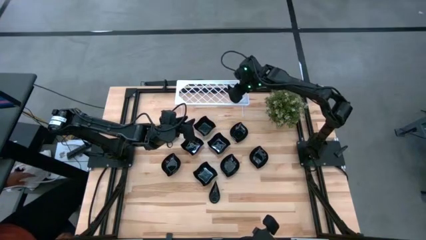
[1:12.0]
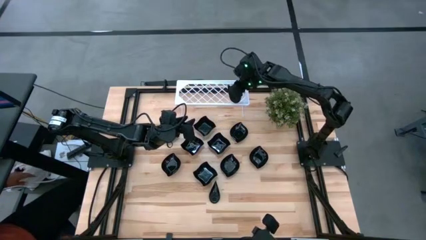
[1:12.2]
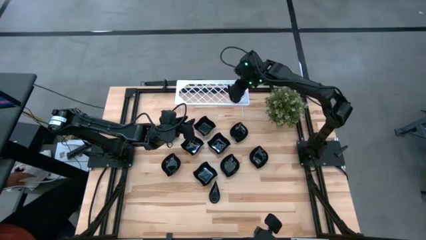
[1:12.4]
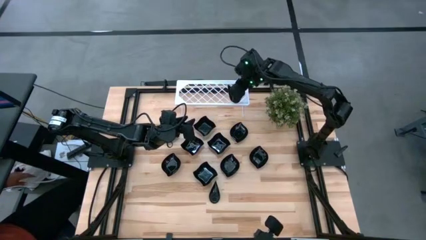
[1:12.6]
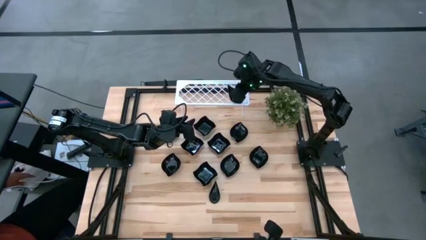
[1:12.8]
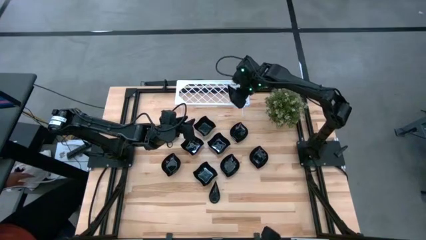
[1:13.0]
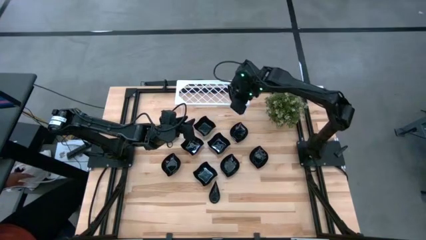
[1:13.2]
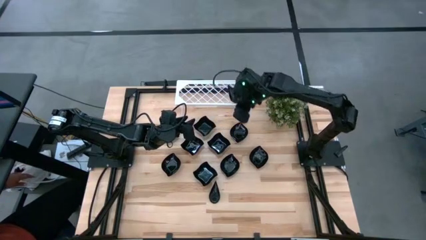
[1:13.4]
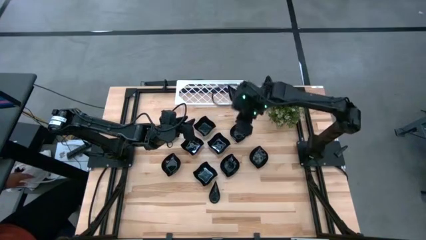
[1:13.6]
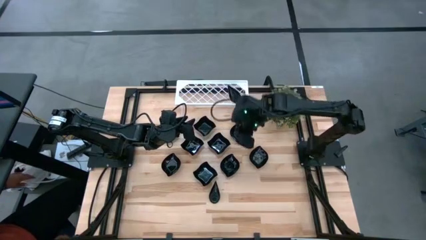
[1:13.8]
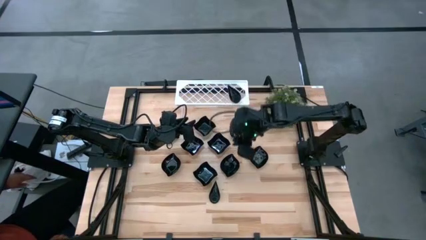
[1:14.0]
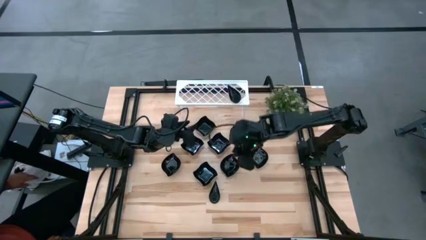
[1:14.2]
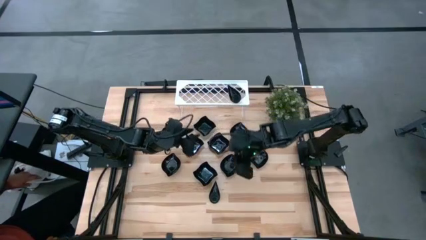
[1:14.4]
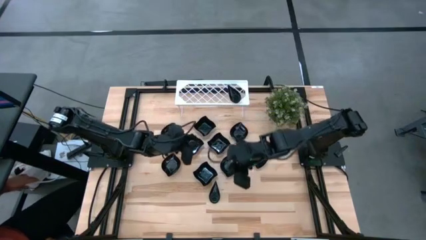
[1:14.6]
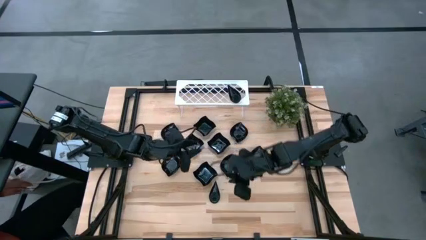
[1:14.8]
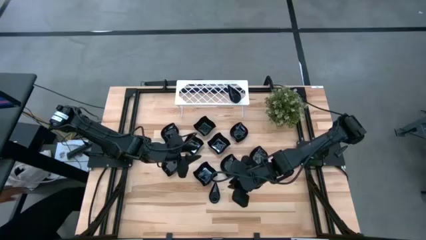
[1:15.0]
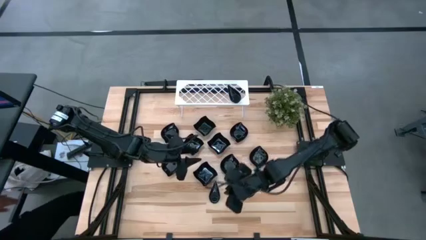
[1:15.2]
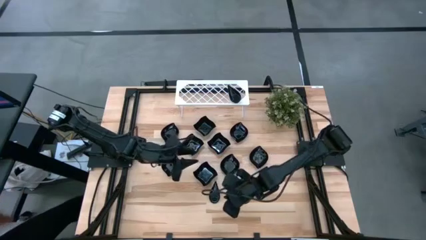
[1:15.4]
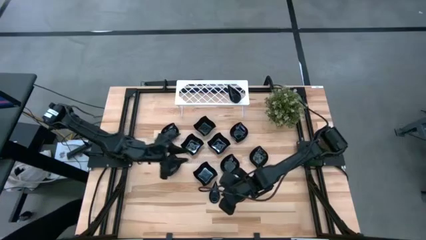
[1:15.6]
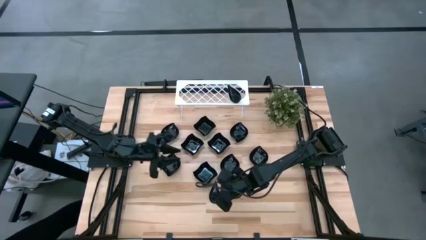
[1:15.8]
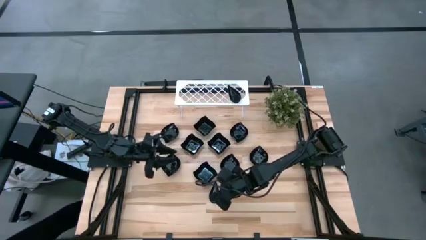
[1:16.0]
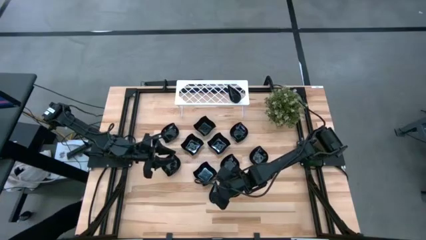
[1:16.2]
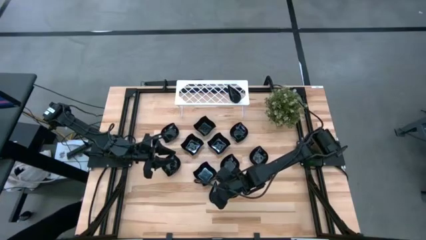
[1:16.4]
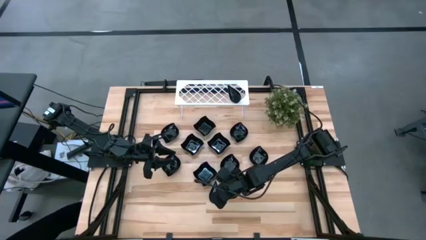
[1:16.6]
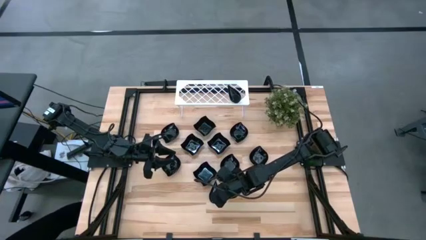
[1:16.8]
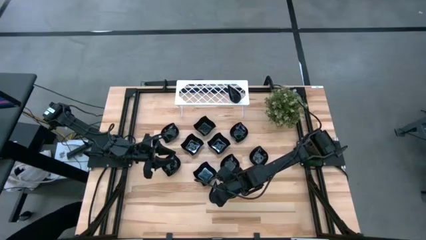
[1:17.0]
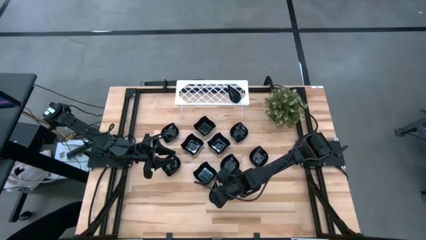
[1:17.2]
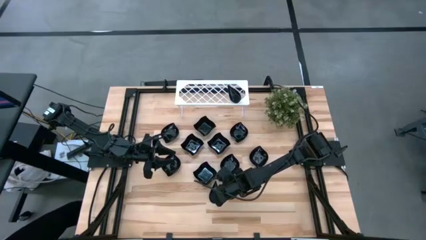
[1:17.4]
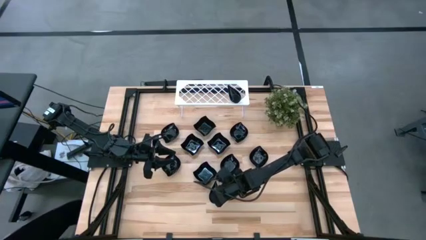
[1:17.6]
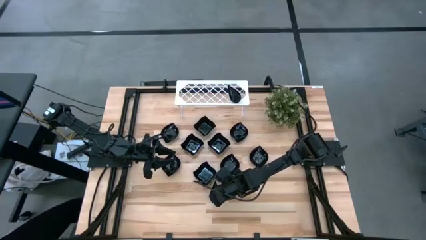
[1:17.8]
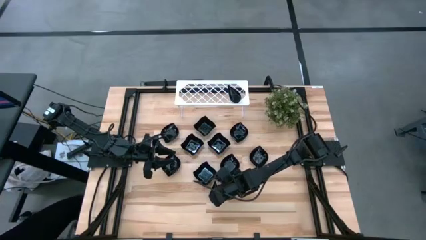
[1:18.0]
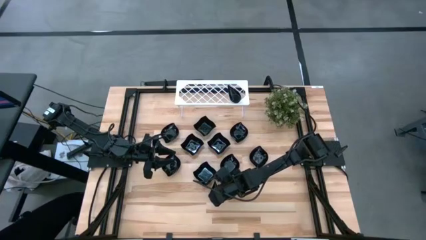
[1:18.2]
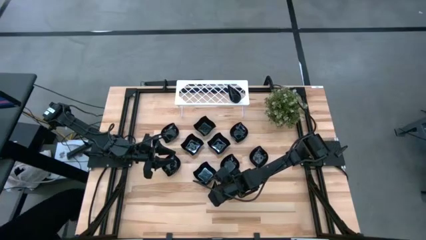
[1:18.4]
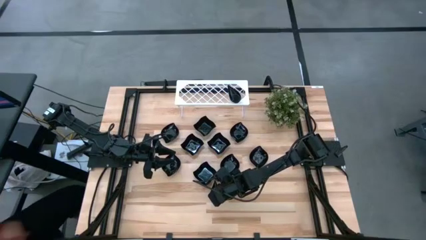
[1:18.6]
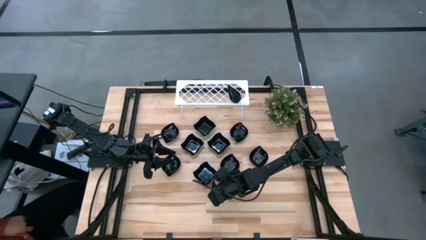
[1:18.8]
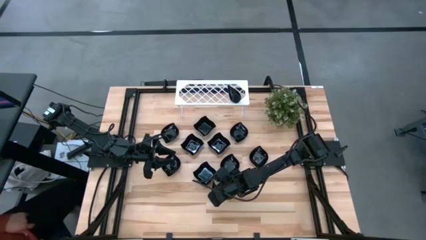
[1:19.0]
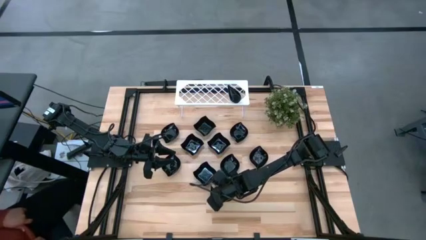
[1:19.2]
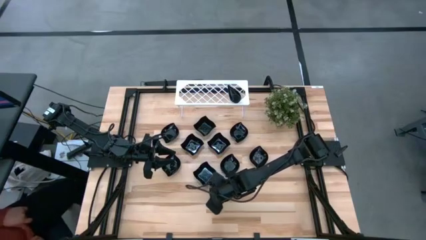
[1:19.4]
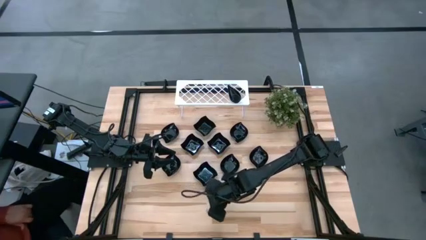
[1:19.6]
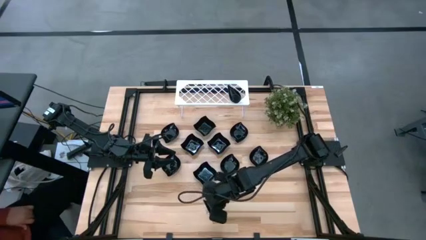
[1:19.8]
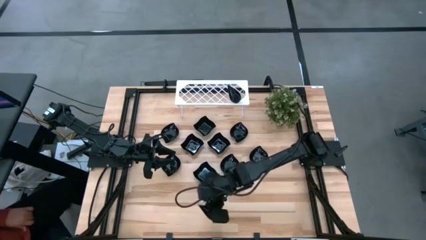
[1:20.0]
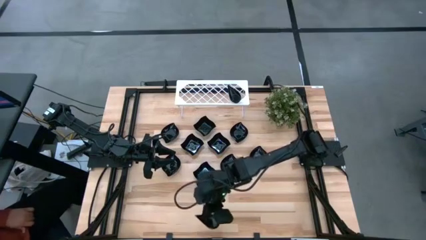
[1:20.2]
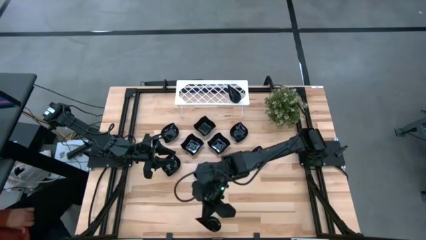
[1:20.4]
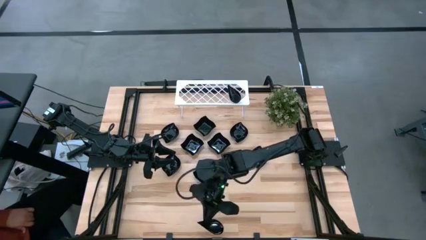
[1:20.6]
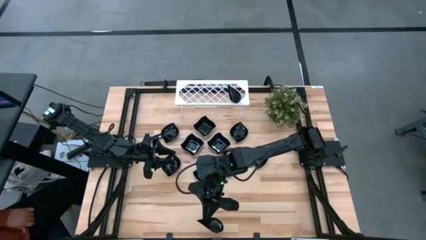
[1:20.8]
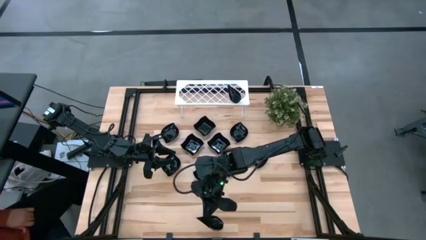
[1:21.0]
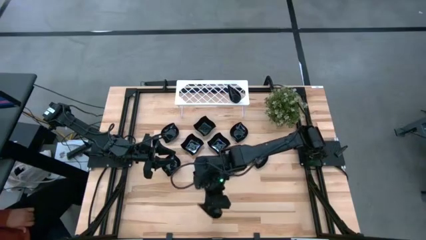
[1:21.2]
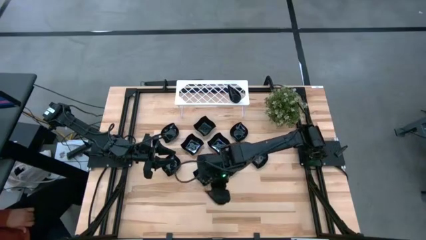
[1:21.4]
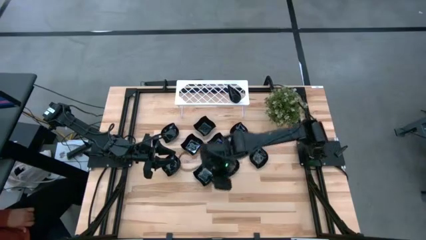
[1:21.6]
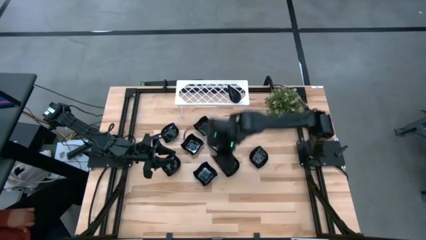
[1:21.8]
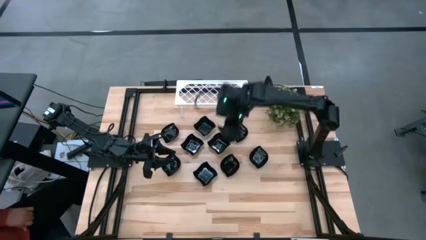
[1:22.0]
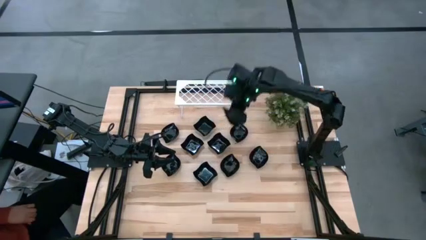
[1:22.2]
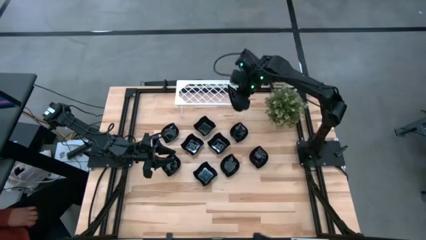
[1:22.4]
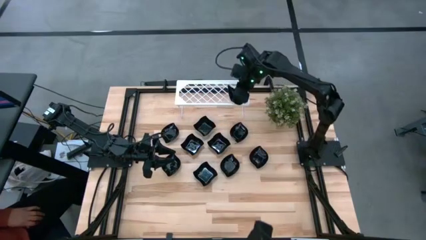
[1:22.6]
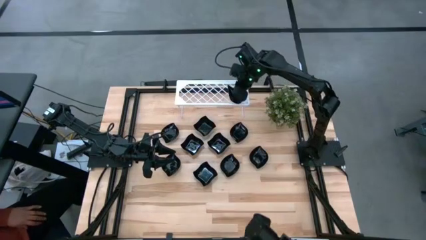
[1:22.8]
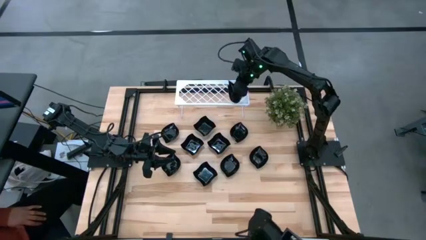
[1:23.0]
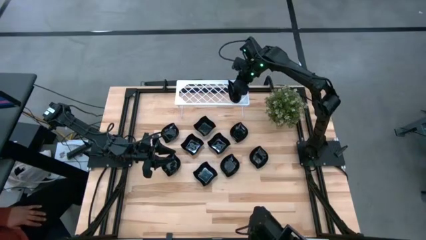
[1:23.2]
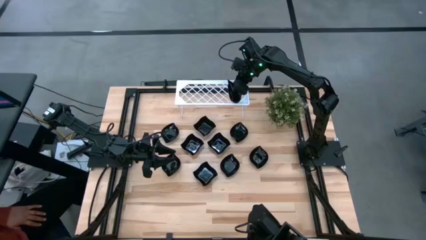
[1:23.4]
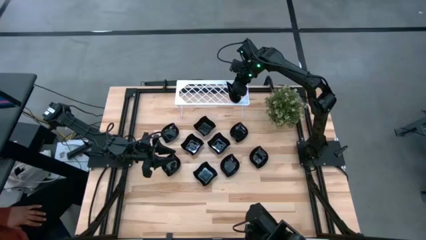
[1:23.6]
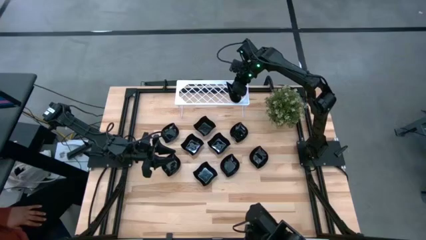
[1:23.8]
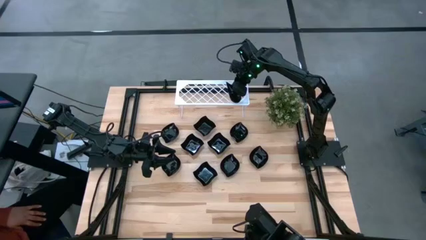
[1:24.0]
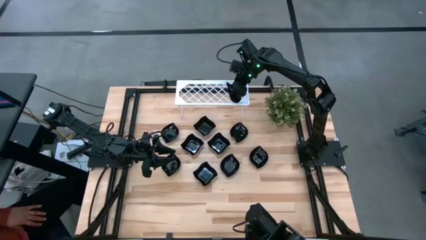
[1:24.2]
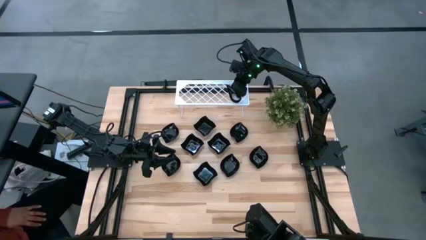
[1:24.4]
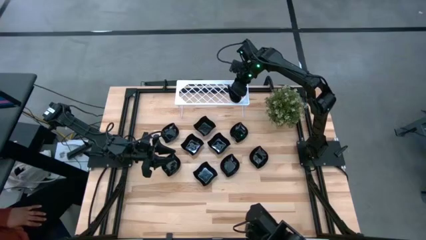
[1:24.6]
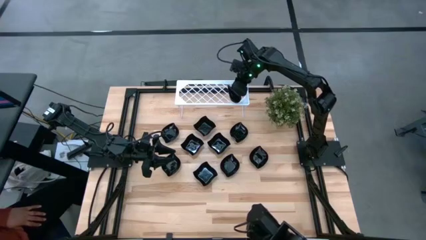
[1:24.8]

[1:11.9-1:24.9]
Task: Pick & Place Mini shaped plates
Stack the drop-shaped plate on top of the other drop-shaped plates on the shelf

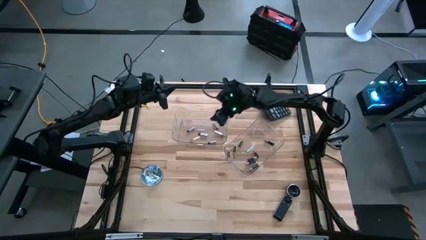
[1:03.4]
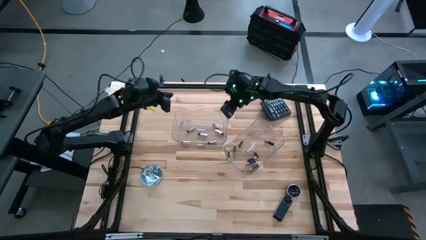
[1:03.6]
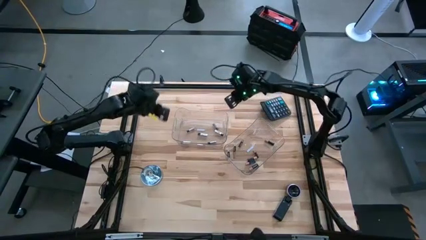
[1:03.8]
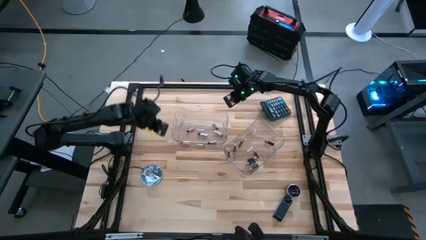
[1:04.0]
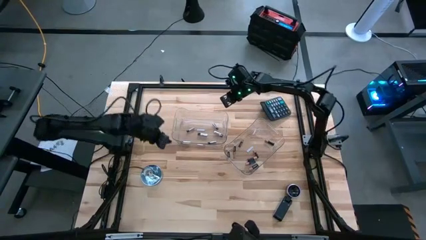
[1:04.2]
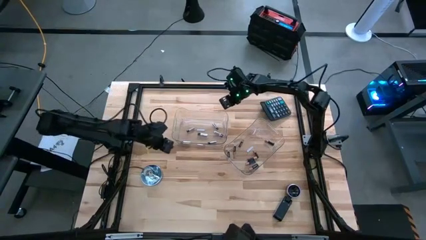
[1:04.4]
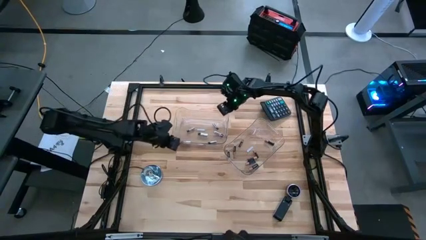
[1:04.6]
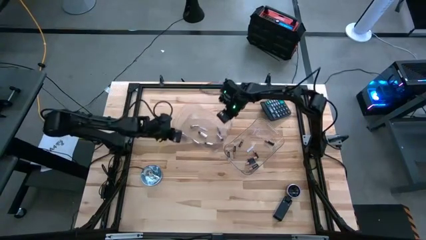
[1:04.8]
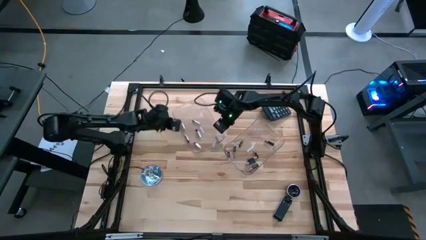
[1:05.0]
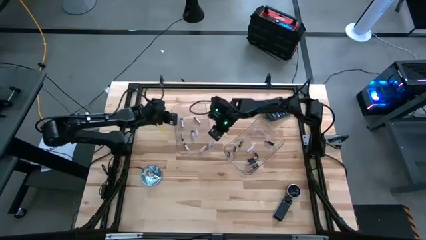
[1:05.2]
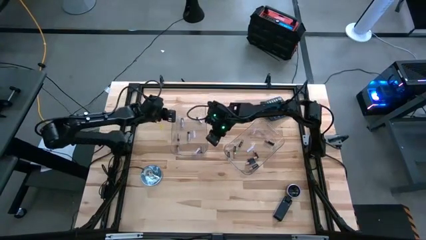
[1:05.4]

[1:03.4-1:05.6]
Task: Sort batteries
Adjust the left transparent bin

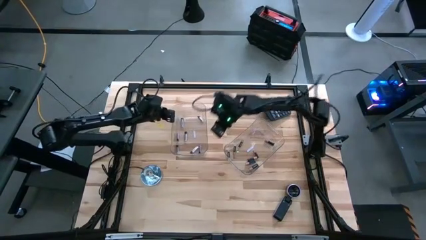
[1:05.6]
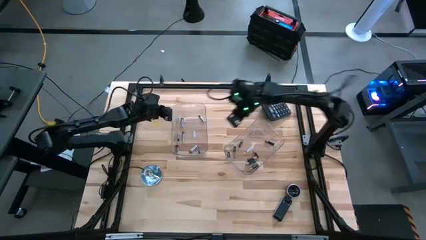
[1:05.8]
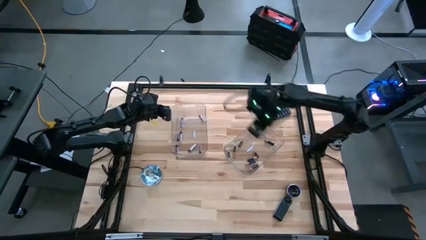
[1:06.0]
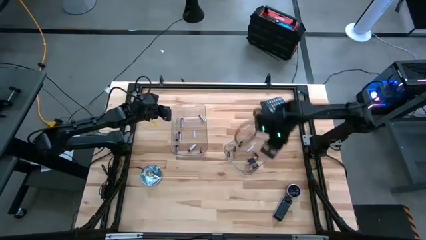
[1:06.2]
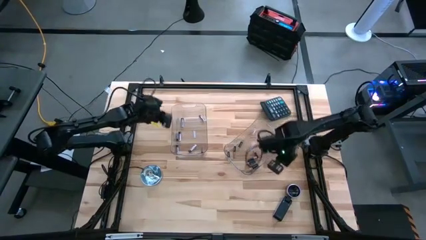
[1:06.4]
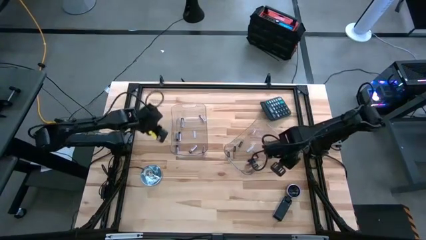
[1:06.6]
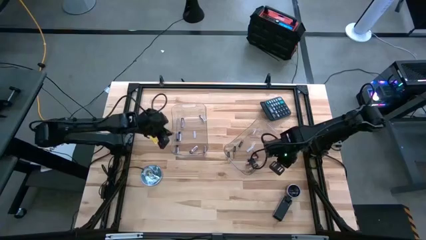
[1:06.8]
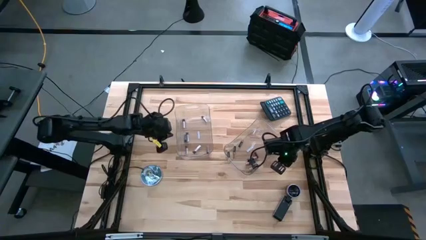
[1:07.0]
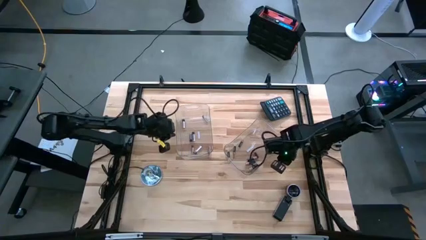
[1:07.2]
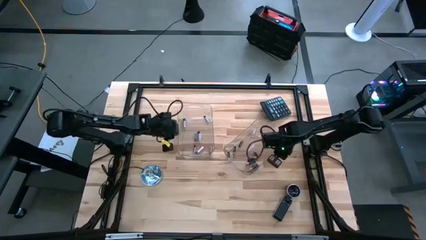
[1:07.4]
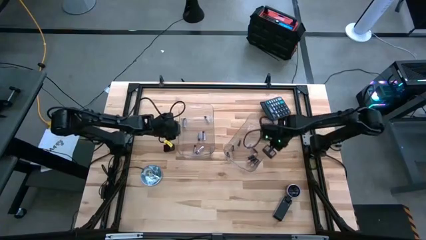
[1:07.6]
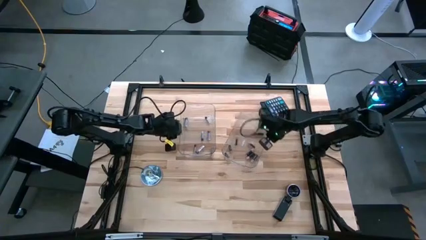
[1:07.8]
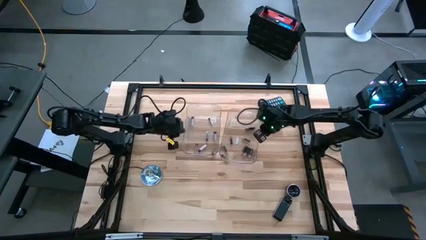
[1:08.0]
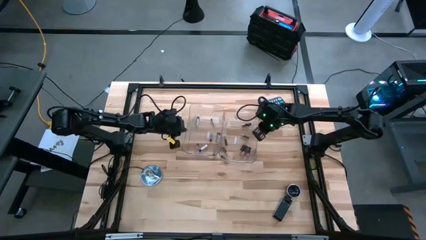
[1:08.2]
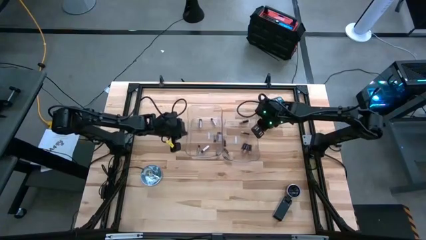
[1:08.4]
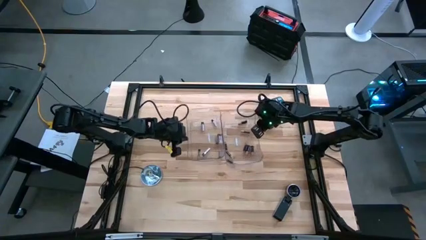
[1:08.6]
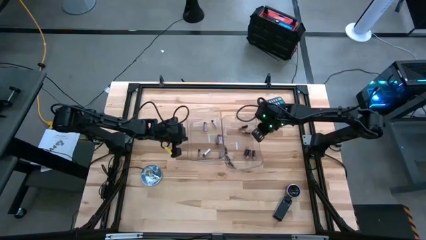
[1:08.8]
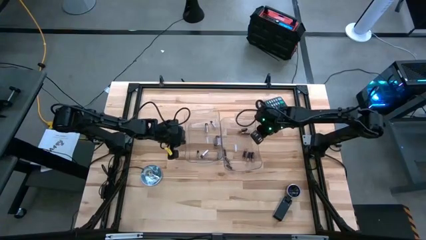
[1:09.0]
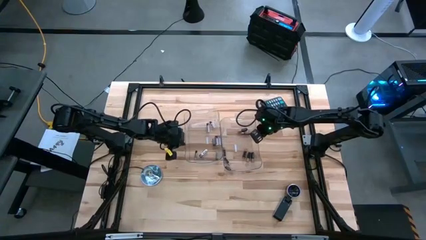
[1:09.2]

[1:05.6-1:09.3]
Adjust the transparent bins
